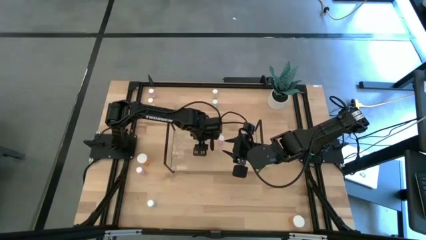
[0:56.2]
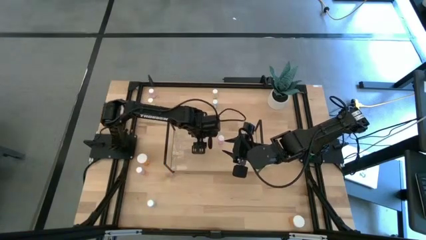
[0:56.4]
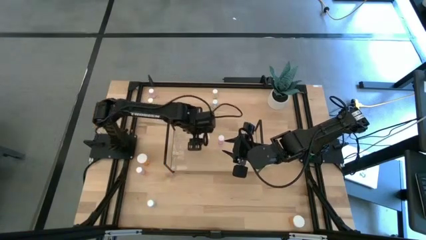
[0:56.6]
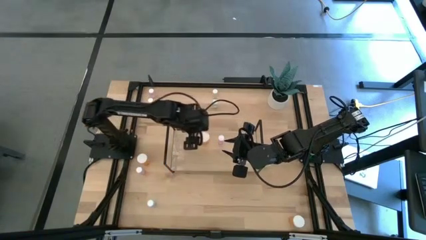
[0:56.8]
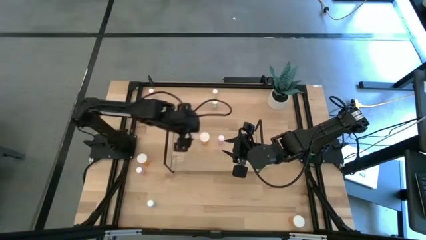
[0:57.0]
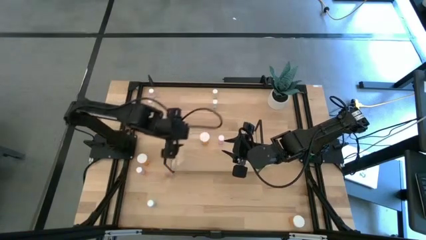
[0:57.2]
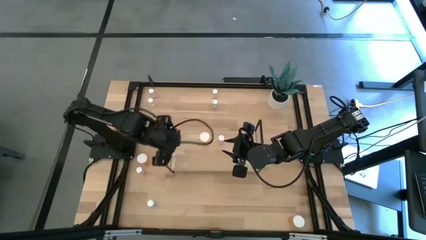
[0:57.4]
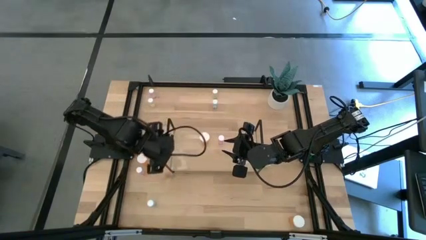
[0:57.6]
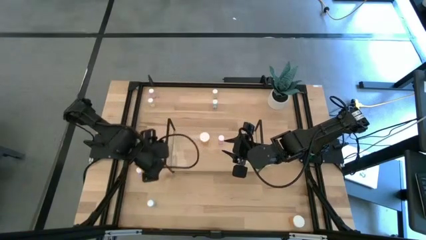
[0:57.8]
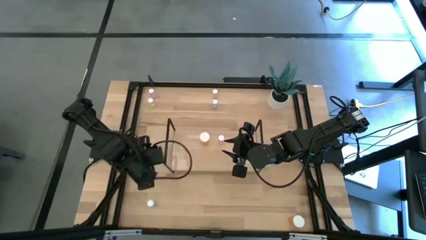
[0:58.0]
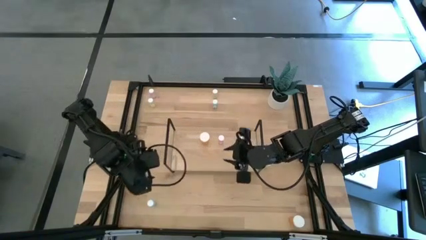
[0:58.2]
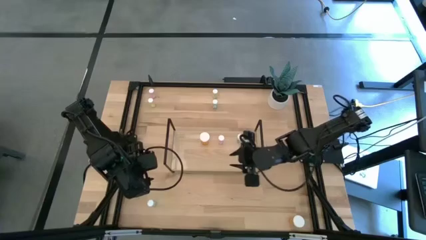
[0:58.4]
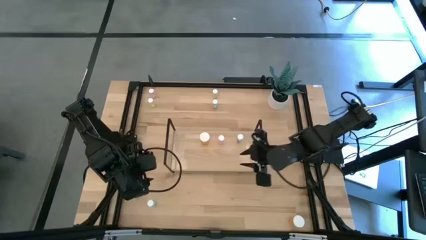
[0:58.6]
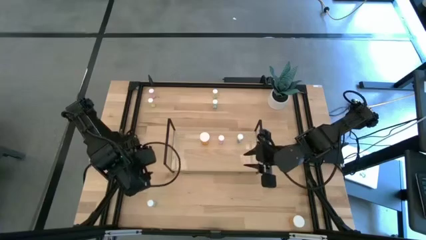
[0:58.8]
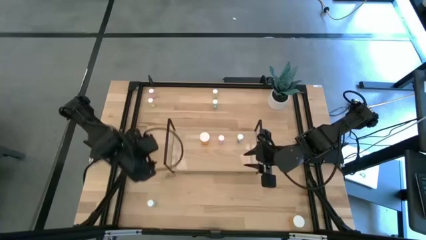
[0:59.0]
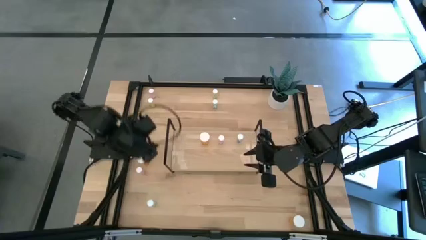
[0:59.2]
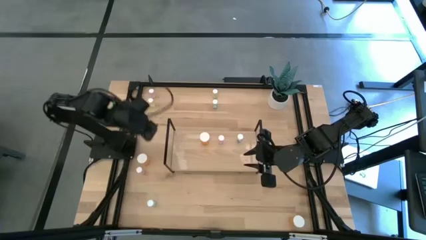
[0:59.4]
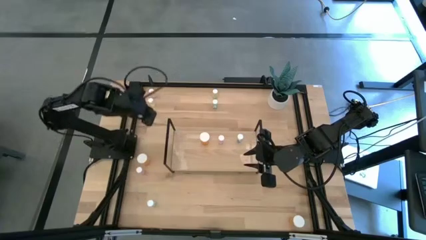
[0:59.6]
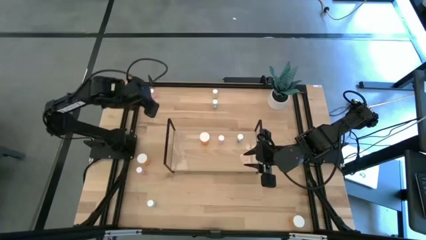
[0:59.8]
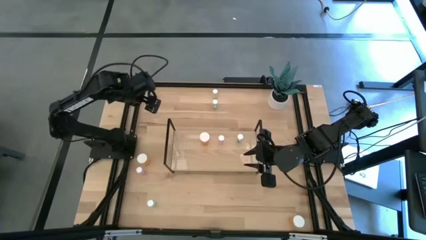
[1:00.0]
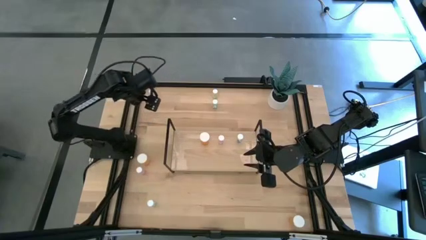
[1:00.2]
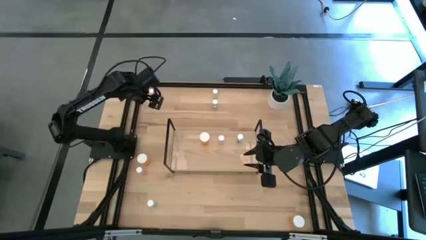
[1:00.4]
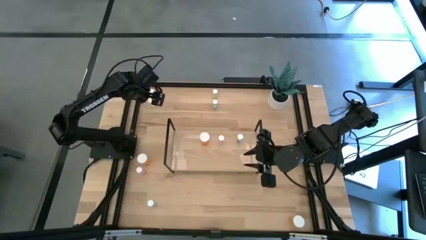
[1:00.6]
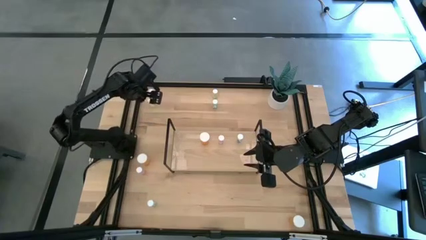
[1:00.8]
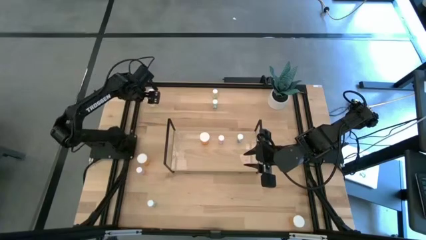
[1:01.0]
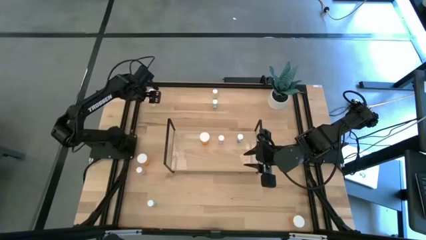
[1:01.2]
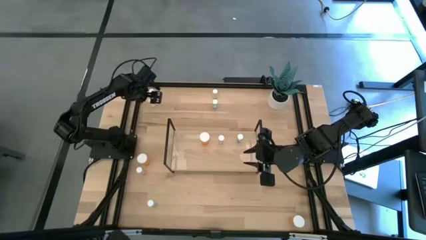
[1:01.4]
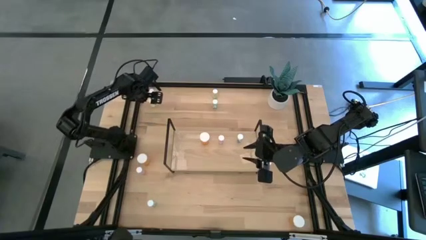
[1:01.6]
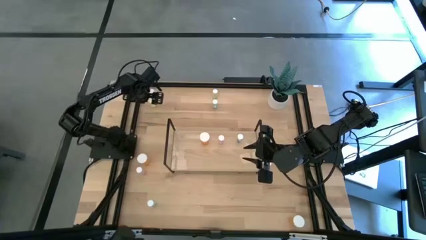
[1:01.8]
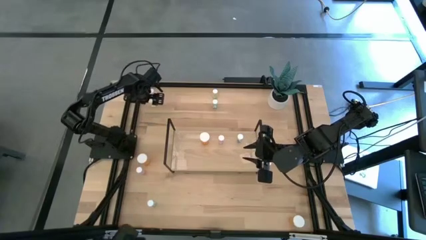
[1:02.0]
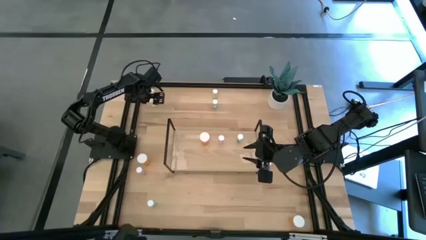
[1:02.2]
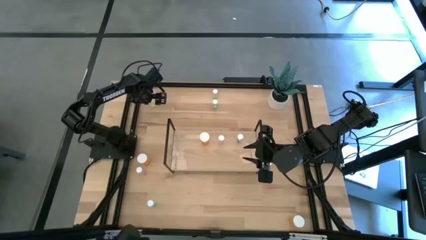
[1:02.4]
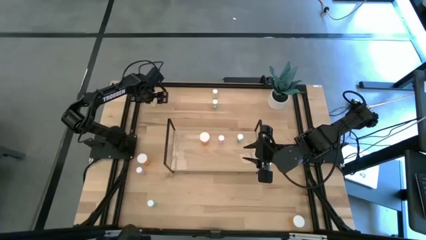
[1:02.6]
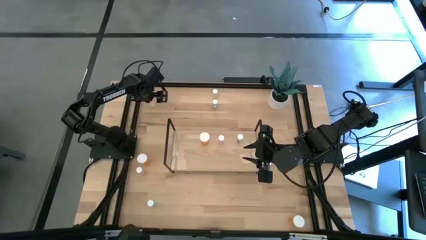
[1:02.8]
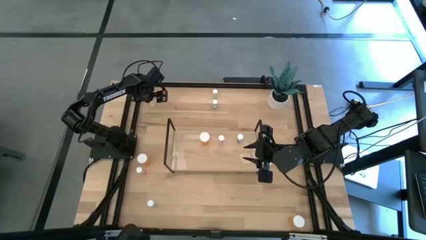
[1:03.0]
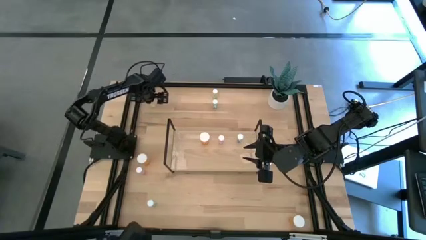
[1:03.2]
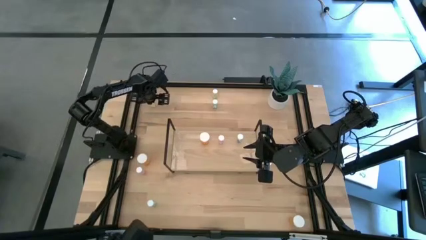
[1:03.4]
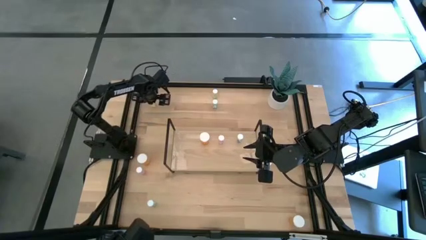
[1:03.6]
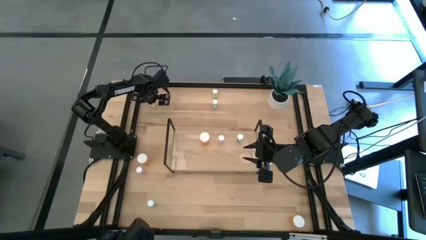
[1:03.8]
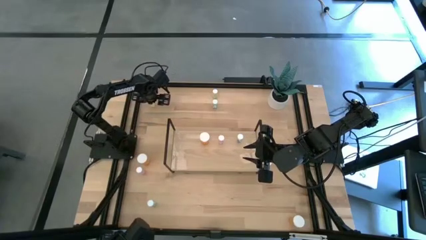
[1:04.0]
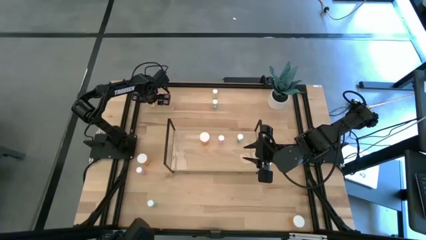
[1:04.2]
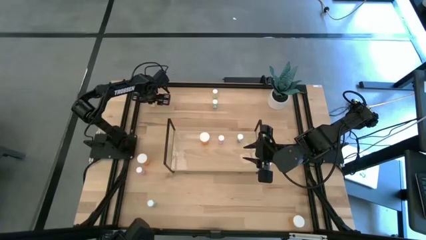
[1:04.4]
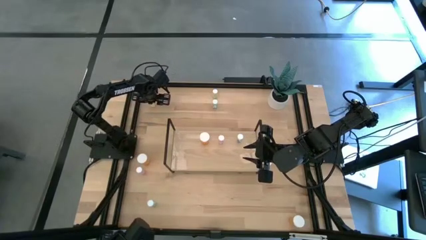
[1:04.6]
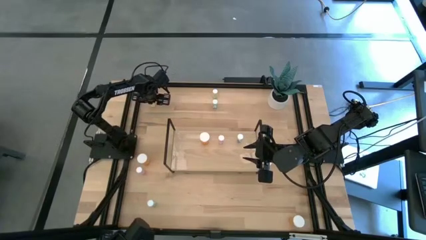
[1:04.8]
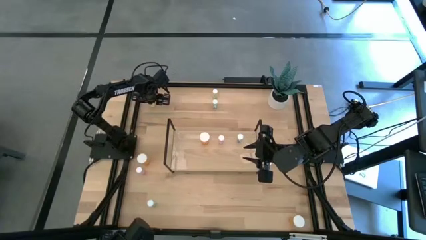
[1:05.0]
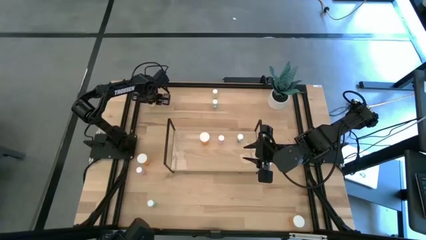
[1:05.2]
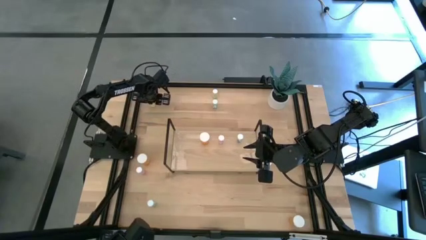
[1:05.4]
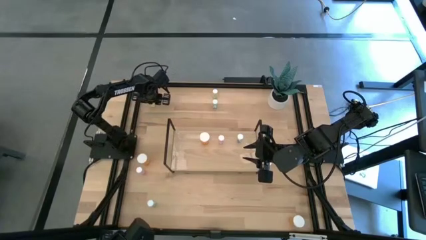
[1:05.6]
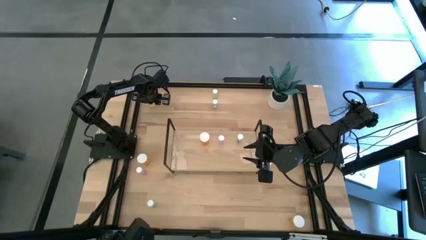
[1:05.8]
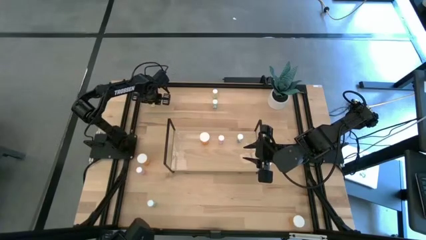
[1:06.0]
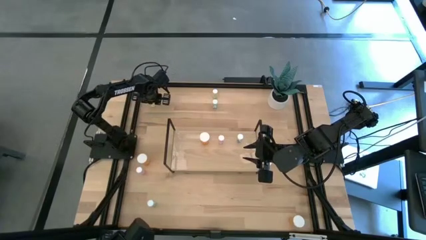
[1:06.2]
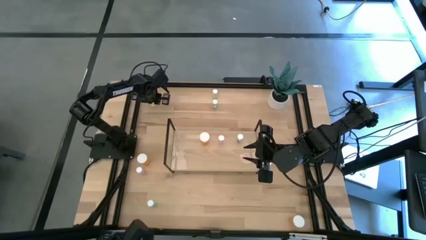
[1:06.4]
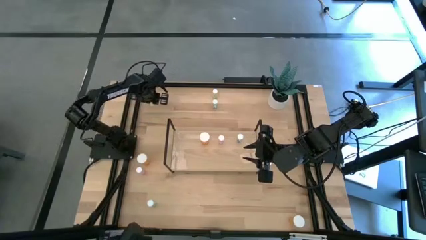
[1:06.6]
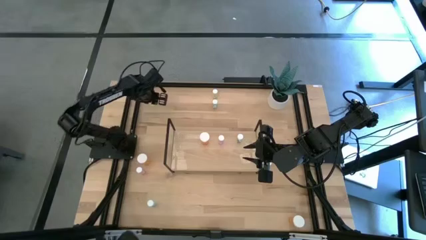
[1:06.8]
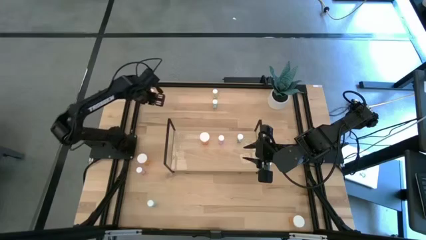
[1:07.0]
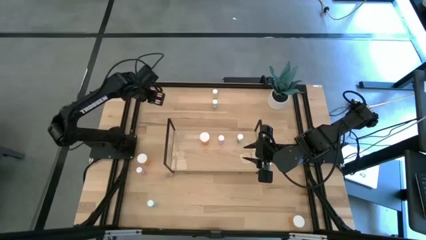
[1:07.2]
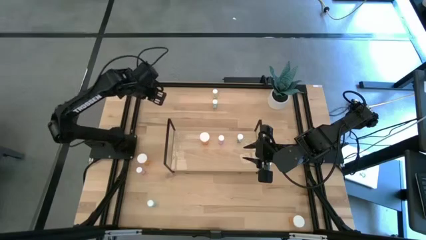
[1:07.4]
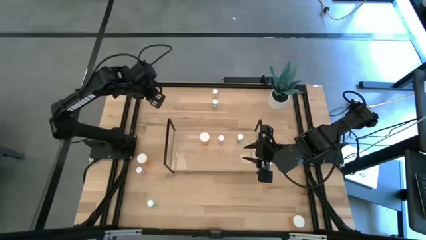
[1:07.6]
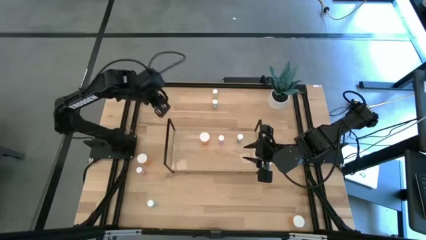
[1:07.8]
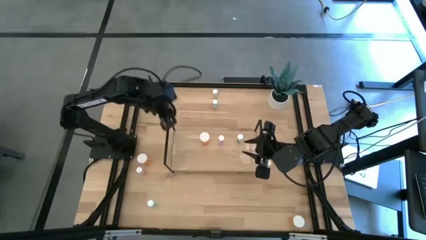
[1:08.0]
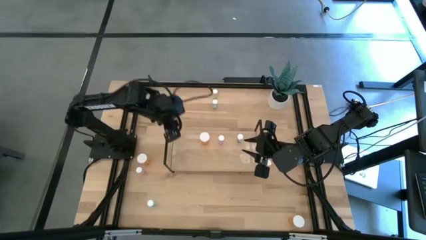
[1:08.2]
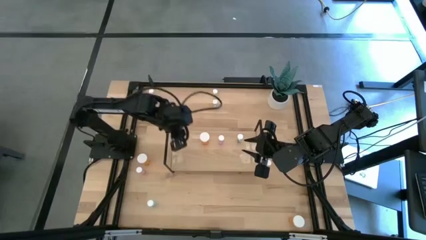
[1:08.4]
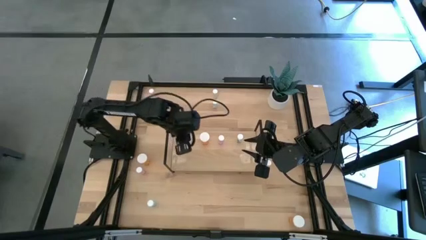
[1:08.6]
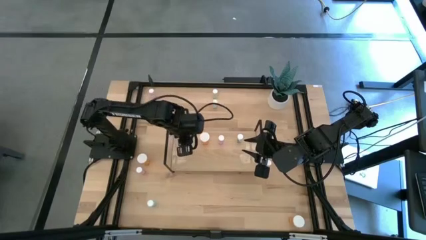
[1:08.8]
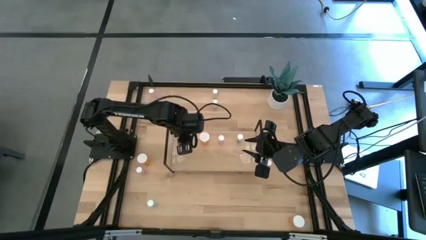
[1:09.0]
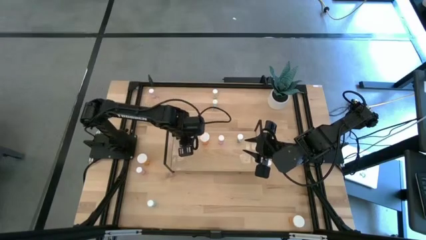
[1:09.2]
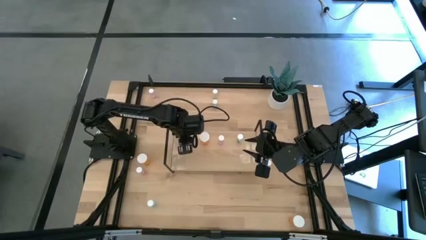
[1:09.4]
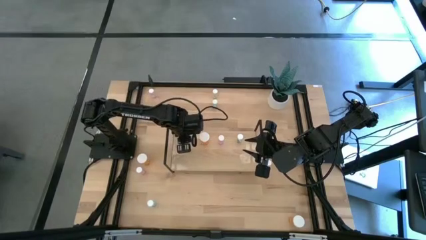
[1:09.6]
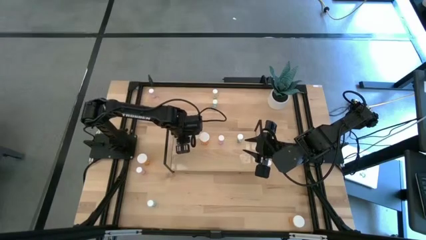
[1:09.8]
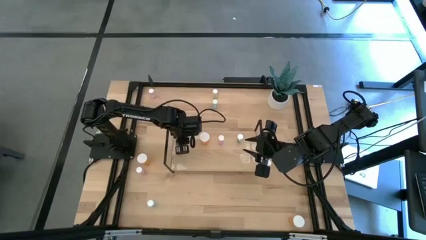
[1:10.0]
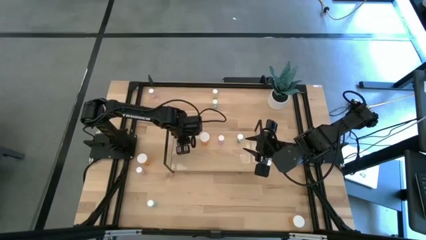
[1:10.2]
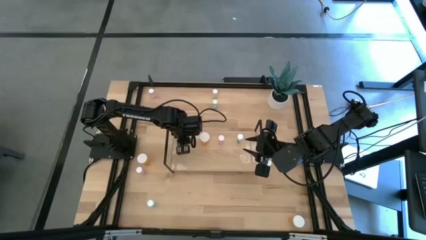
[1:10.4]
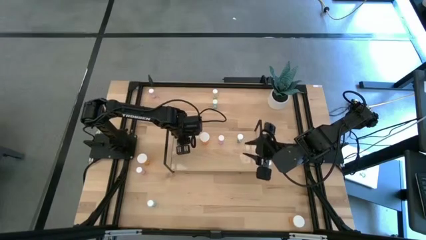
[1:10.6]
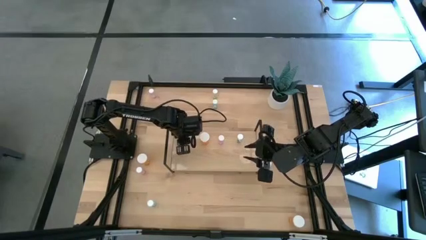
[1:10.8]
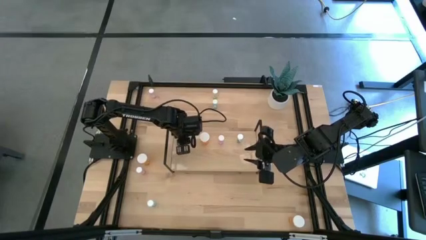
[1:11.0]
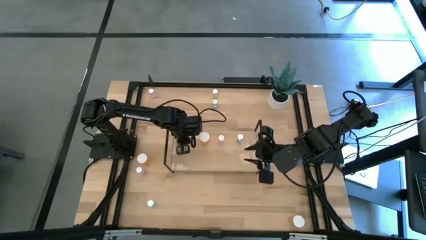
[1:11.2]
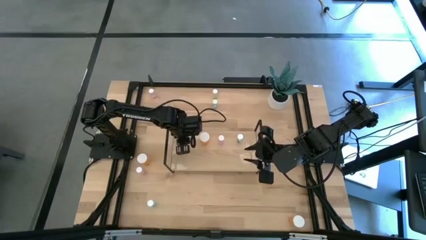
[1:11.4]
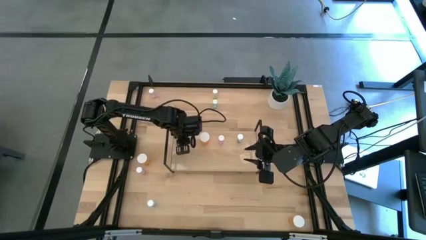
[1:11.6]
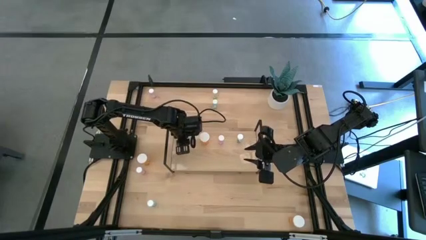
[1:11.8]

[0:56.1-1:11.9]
Task: Pick and place medicine bottles onto shelf by color
Put the left yellow pill bottle on the shelf

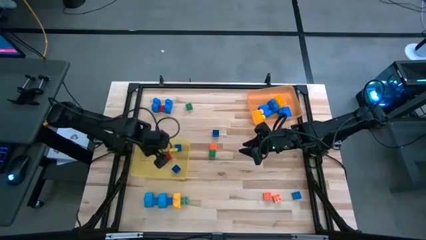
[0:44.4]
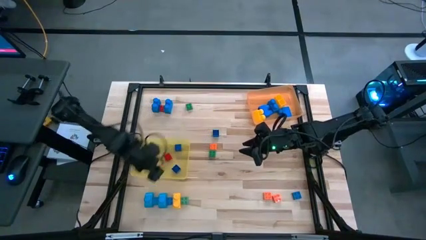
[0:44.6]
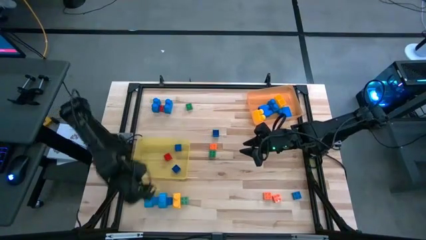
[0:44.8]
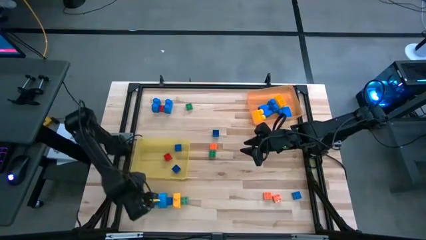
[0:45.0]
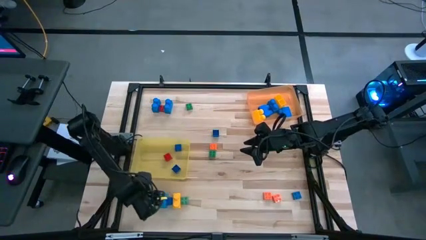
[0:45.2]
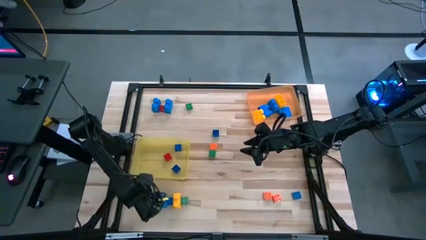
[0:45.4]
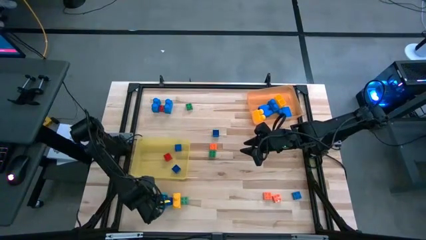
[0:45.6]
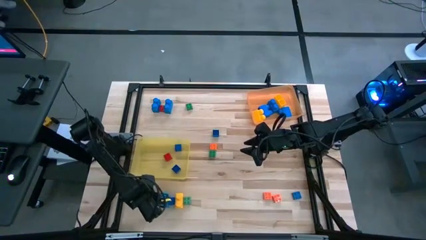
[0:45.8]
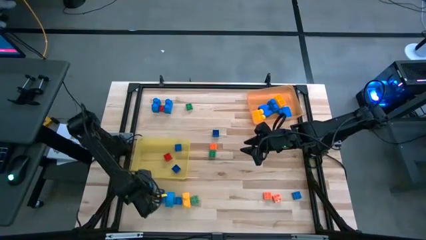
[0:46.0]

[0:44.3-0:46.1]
Task: Sort blocks by size
Put the blue 1 stud game piece into the yellow bin
